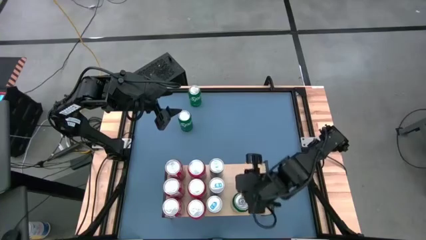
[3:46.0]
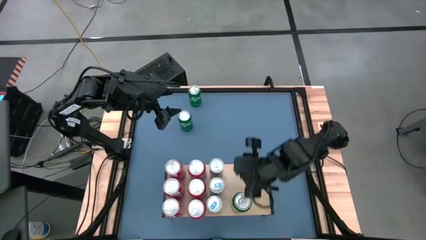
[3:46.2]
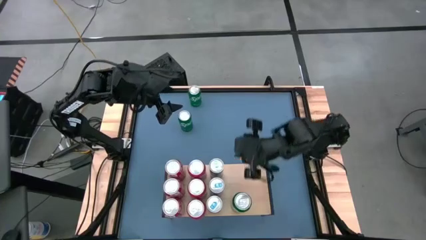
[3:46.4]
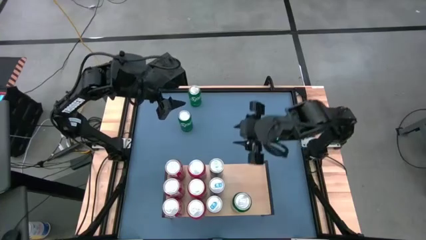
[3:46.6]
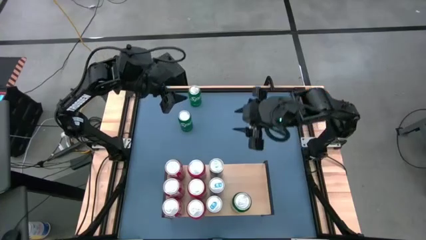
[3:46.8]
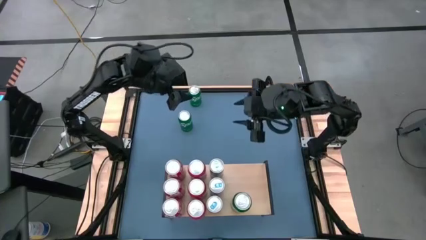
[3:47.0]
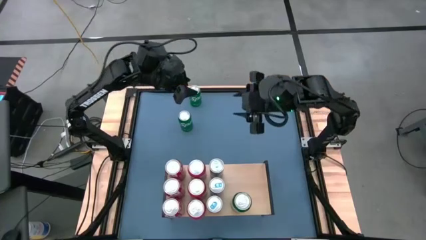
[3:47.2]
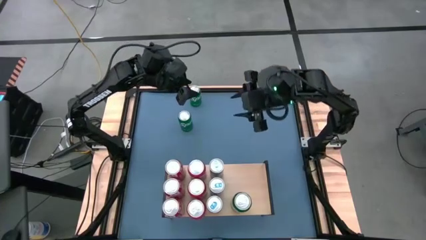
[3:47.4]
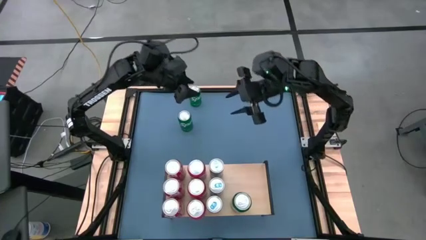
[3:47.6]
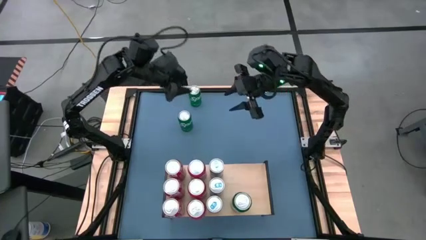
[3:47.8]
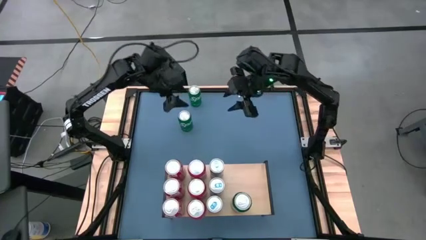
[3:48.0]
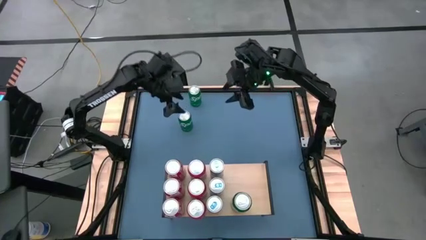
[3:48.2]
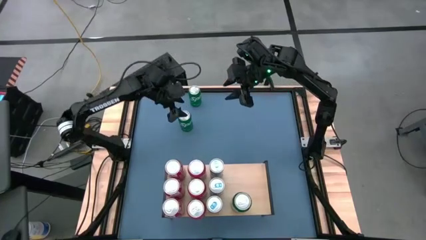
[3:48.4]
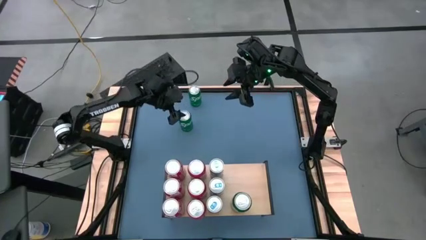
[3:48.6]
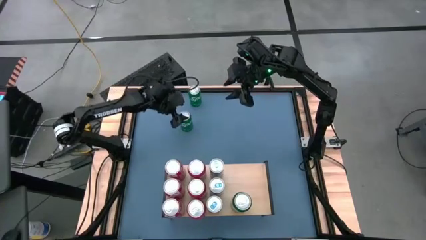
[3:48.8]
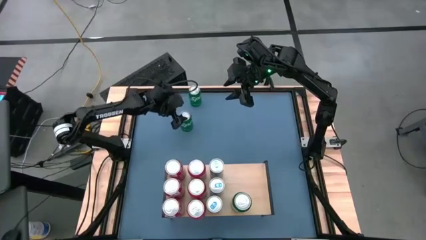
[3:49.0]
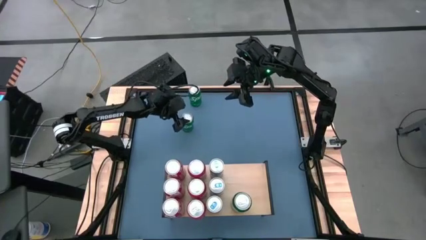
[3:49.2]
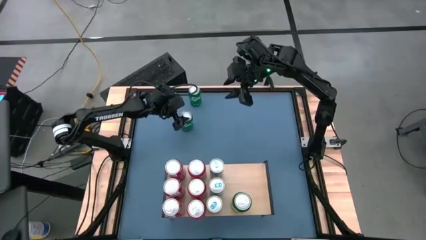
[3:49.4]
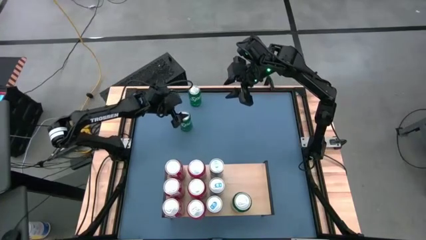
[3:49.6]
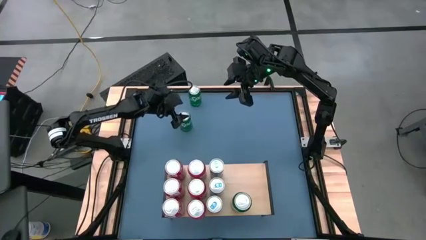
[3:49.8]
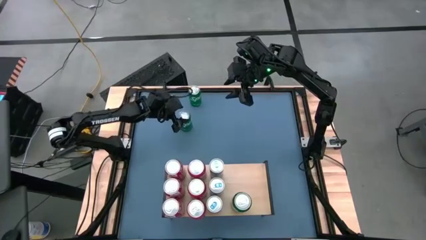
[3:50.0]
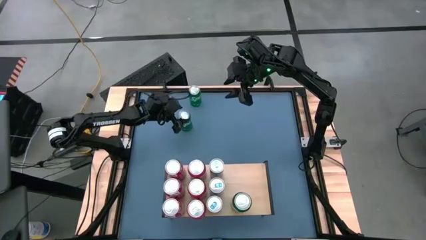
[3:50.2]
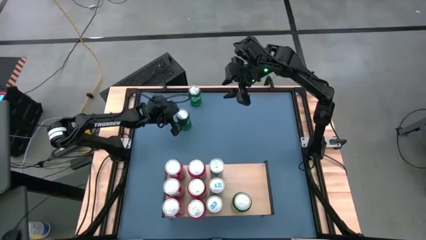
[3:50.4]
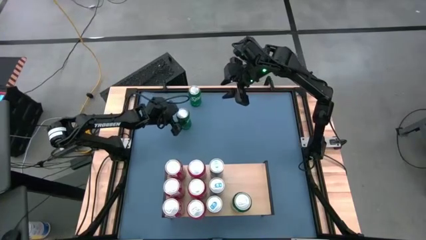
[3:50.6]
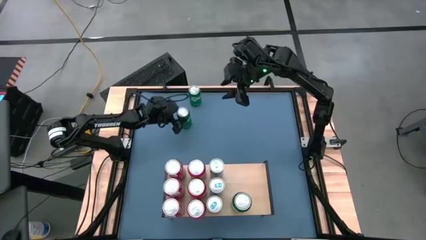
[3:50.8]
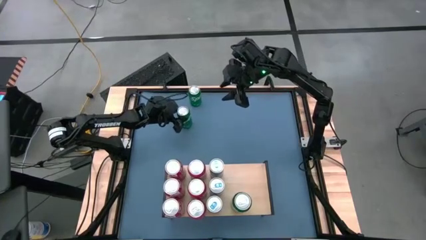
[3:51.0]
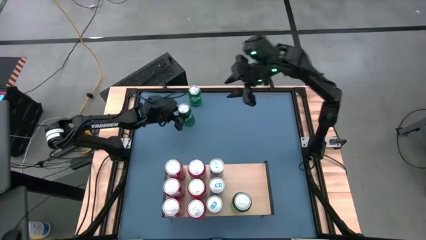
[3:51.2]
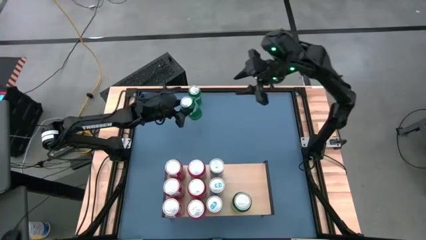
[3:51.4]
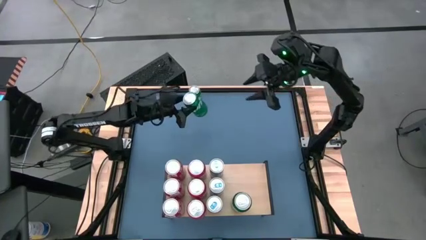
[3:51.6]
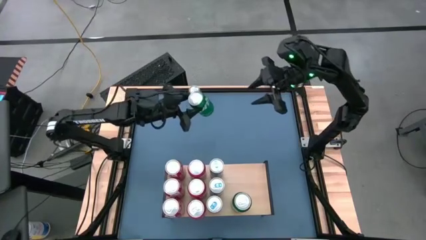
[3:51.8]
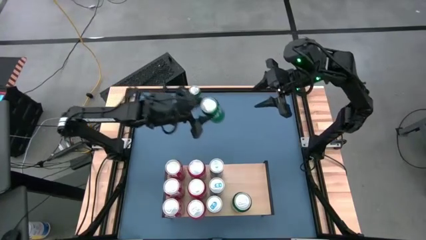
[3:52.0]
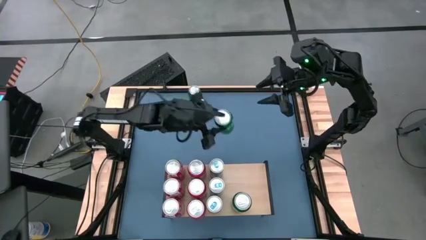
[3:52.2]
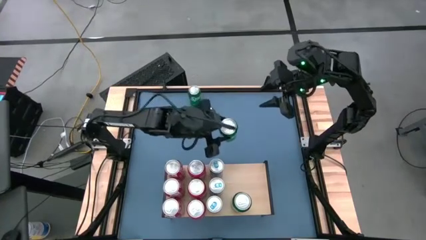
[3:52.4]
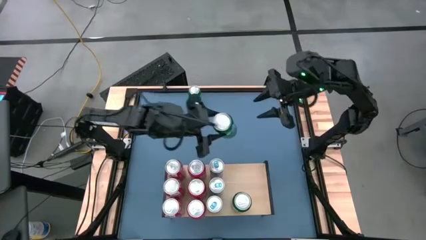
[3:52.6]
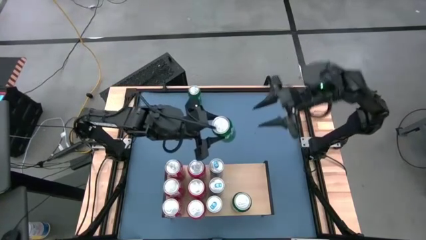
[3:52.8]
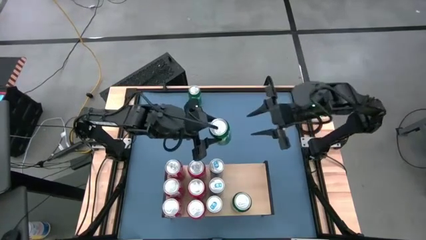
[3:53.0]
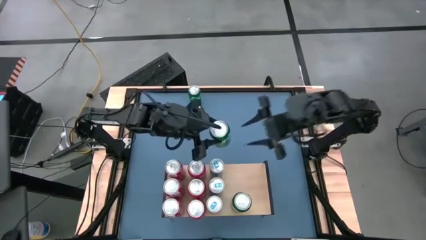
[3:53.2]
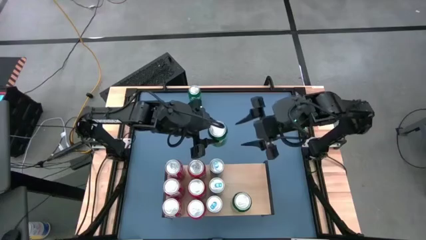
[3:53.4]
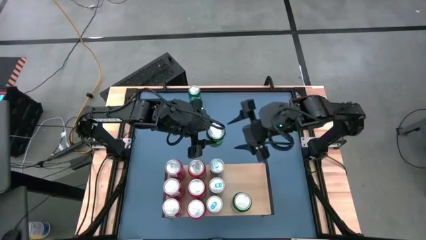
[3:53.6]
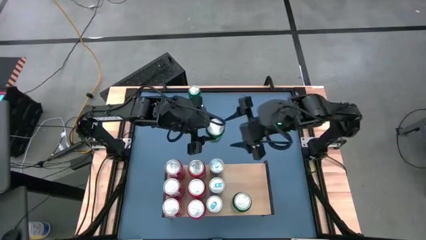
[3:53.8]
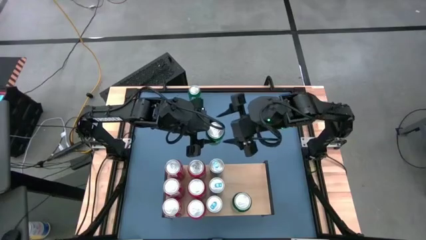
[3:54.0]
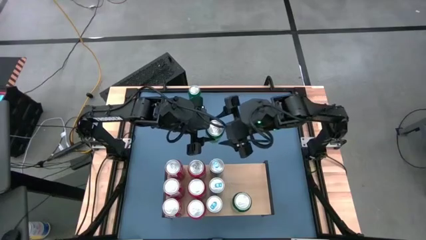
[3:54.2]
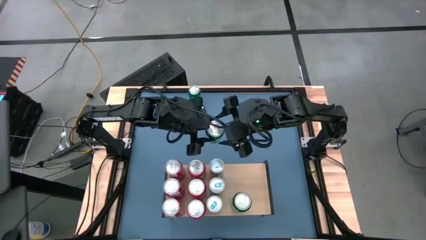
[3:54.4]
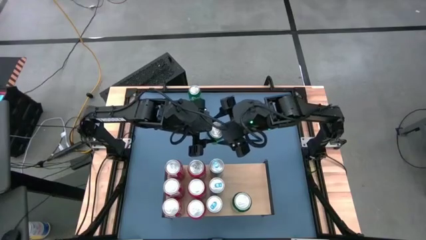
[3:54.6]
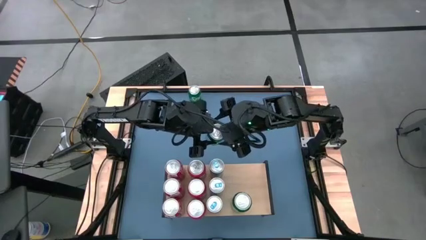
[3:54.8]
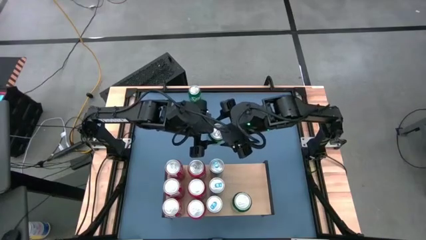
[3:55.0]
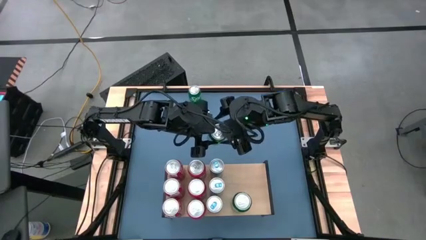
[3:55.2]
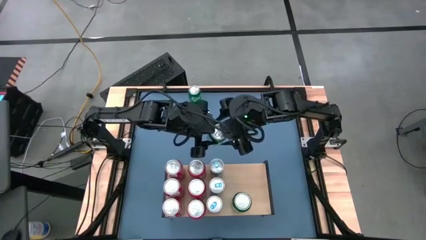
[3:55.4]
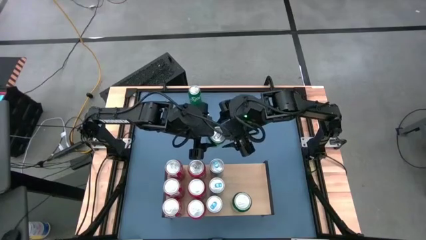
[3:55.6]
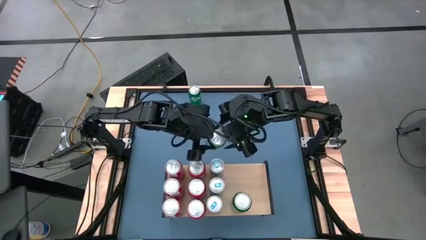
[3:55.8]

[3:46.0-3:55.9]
Task: Place canned beverage on shelf
Put the bottom green soda can on the shelf aligned with the other green soda can

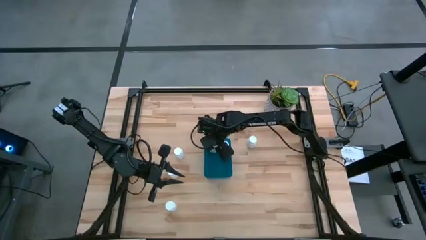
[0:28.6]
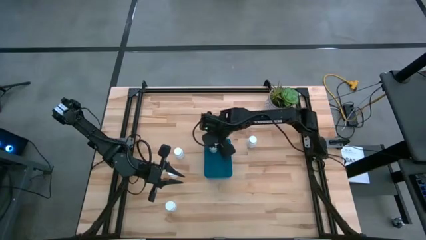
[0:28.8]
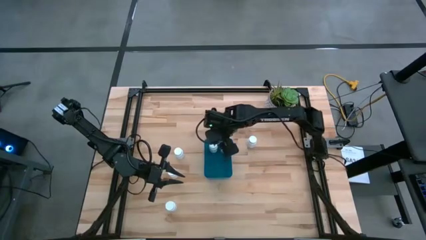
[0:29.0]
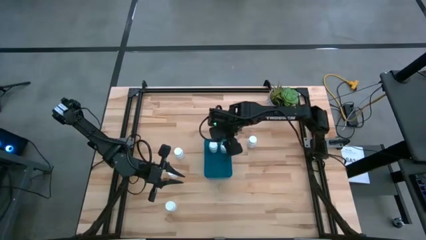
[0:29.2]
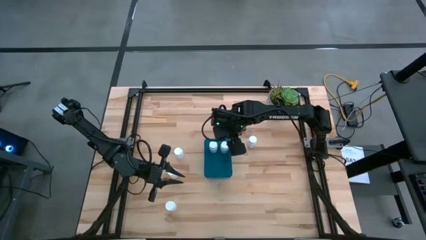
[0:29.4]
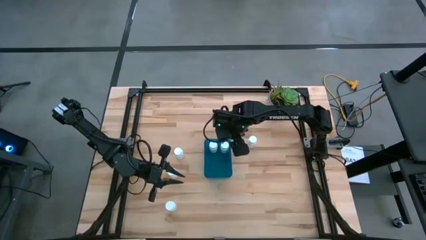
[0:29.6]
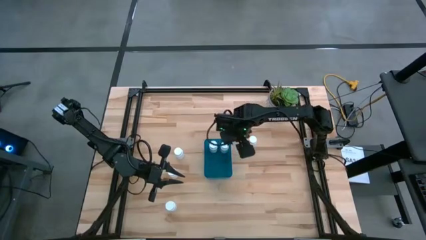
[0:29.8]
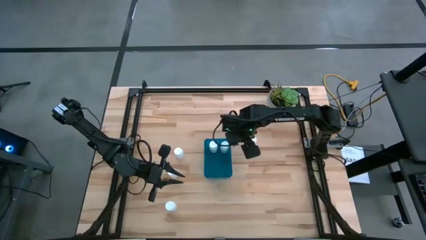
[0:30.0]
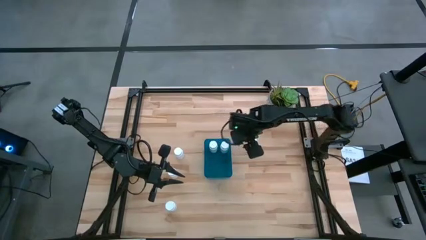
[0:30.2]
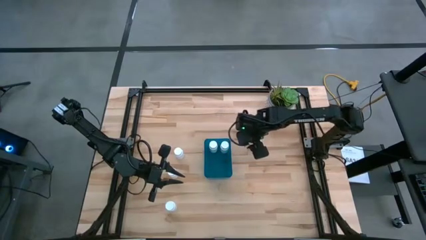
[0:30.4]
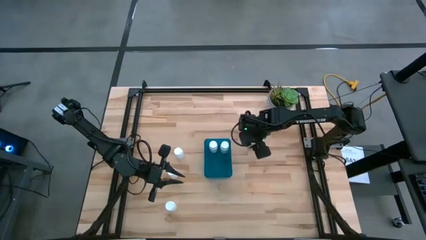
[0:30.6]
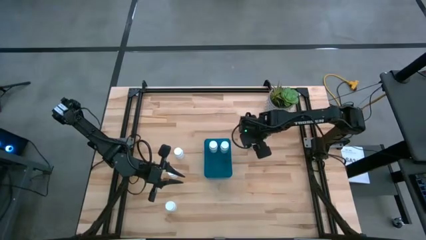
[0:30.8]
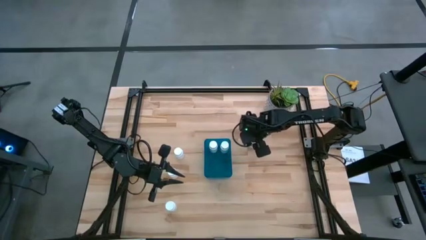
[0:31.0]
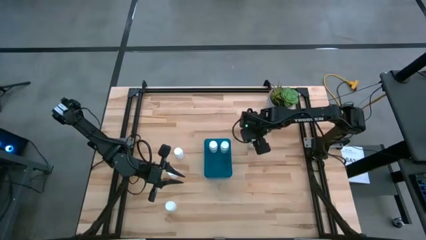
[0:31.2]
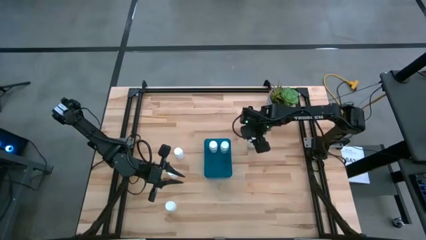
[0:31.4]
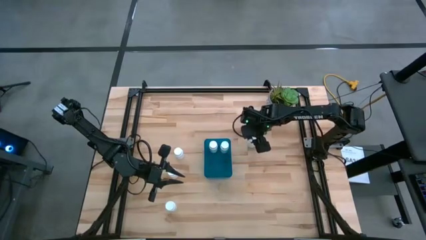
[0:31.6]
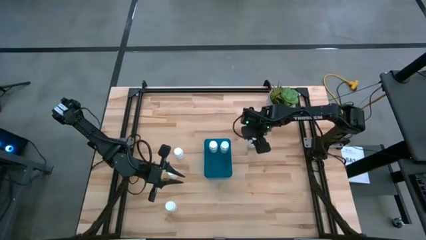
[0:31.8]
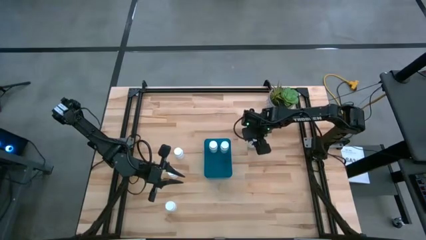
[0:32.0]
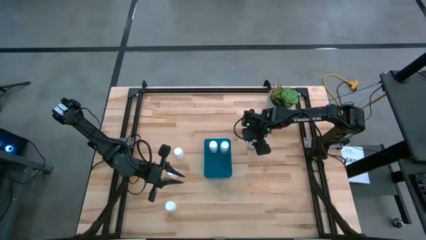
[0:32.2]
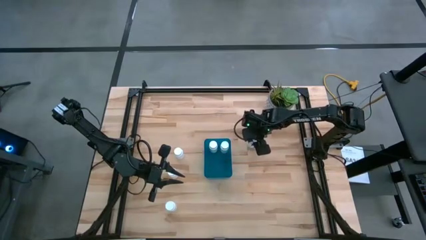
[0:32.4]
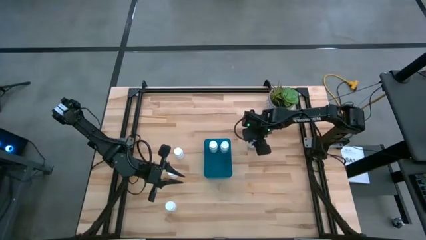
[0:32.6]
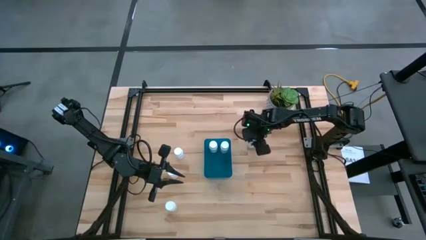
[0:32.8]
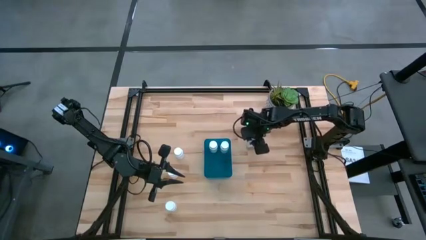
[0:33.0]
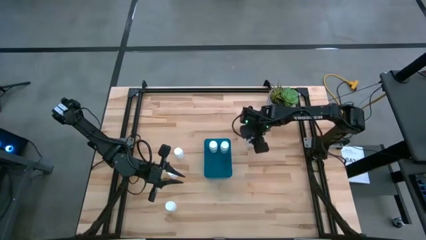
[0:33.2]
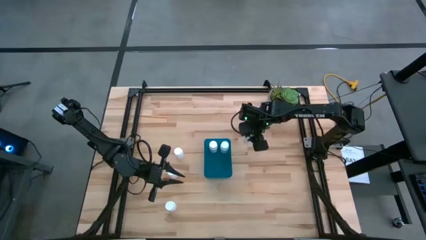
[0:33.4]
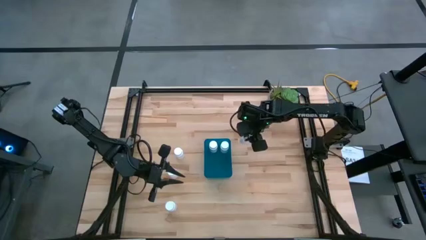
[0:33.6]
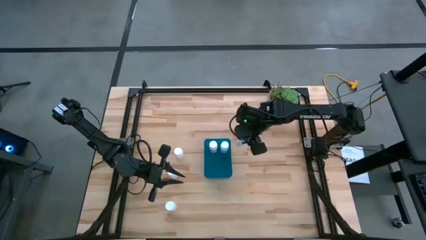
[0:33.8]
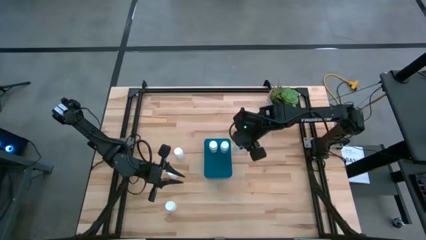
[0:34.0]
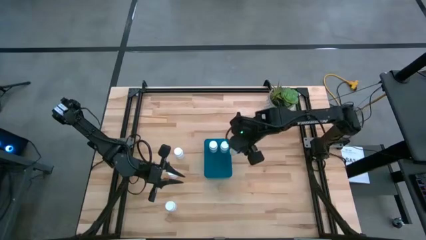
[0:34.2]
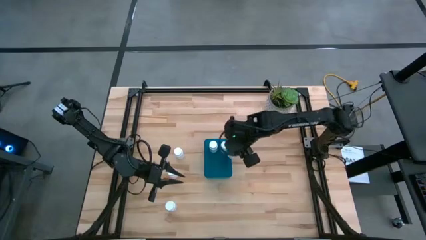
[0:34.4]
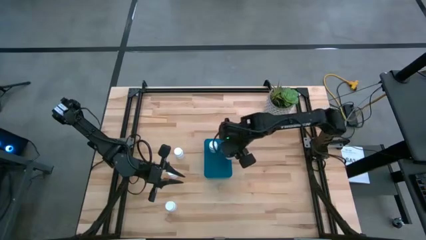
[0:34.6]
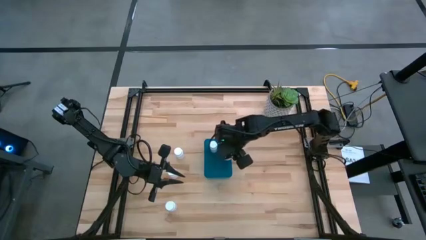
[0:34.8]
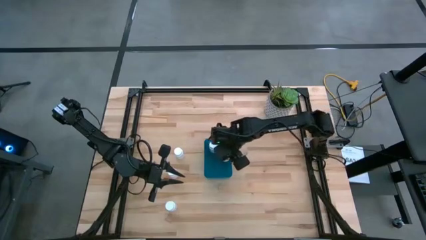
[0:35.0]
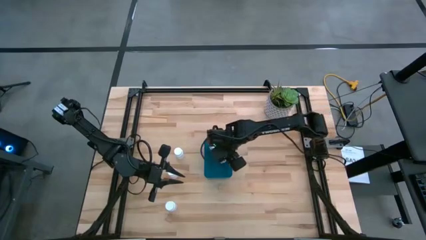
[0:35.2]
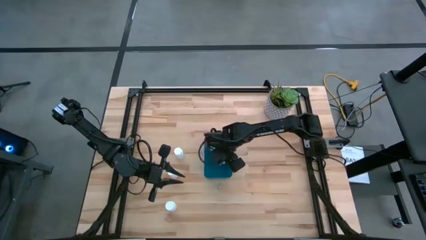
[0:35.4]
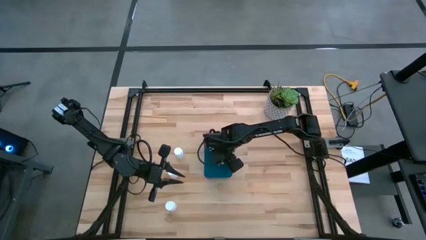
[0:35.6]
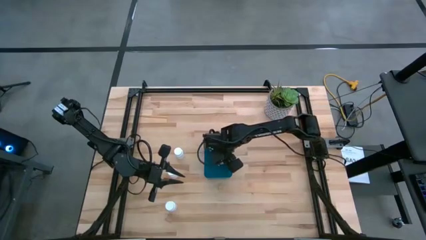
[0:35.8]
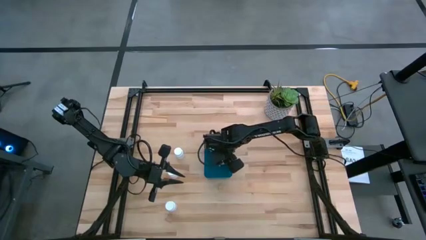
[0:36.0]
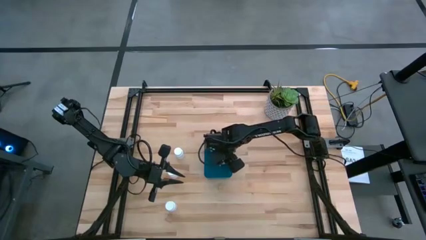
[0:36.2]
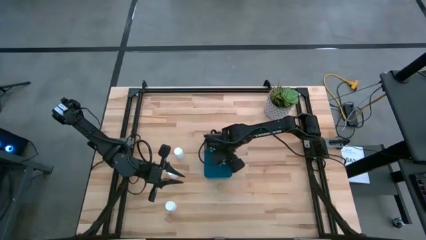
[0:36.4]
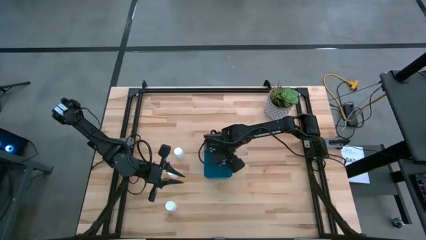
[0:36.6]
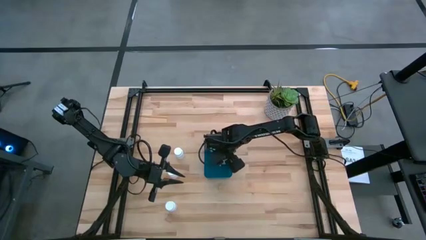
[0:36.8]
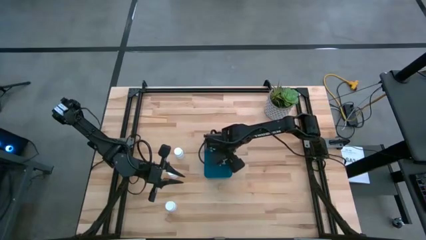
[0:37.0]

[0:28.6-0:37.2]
Task: Pick and place pill bottles into a basket
Put the medicine bottle in the blue bin
